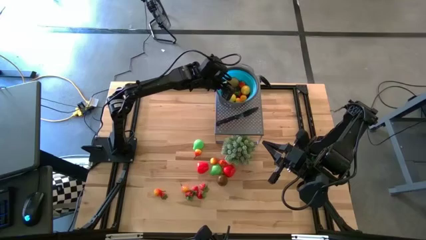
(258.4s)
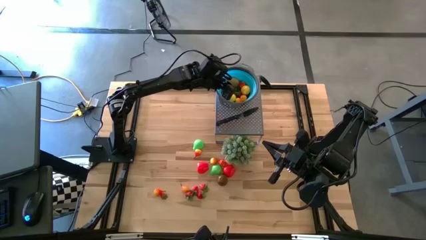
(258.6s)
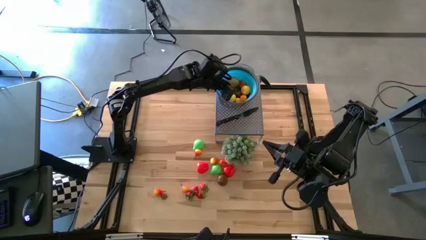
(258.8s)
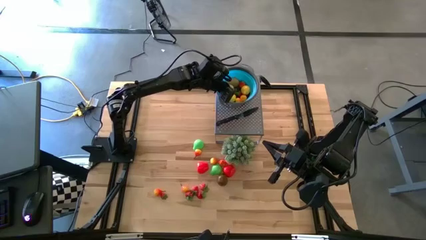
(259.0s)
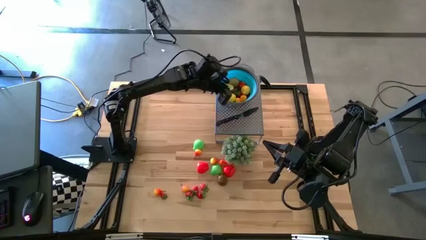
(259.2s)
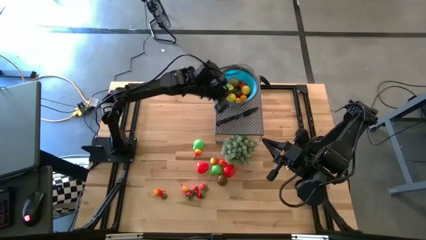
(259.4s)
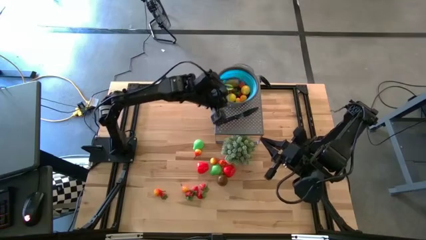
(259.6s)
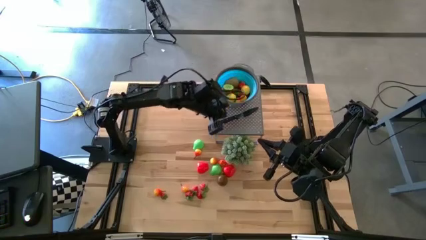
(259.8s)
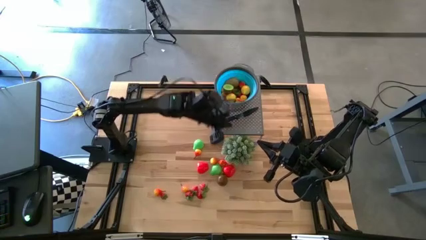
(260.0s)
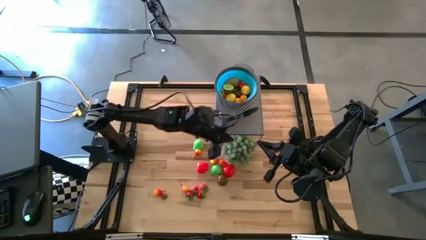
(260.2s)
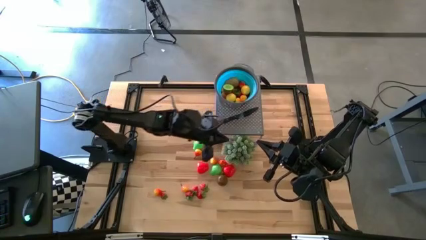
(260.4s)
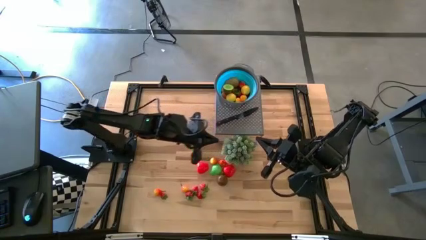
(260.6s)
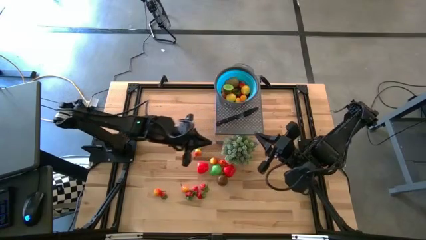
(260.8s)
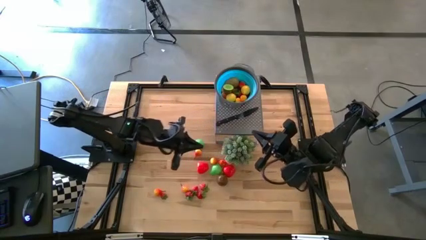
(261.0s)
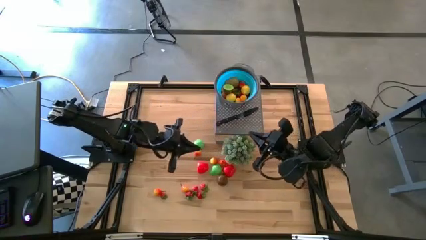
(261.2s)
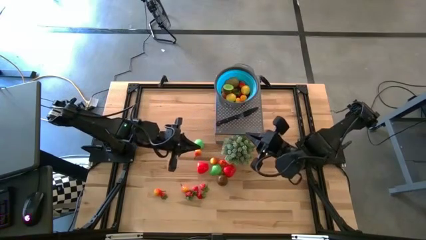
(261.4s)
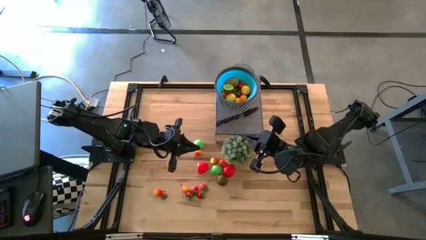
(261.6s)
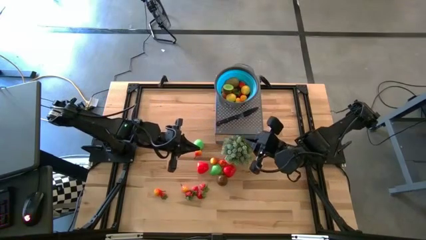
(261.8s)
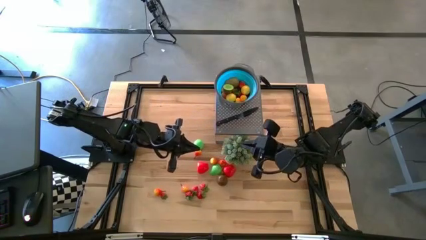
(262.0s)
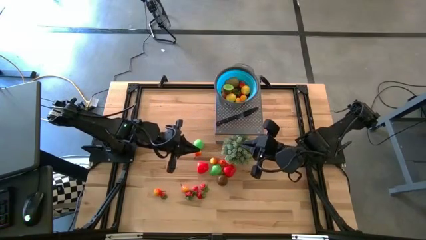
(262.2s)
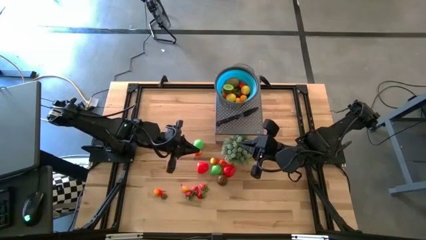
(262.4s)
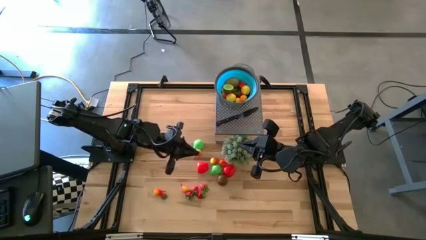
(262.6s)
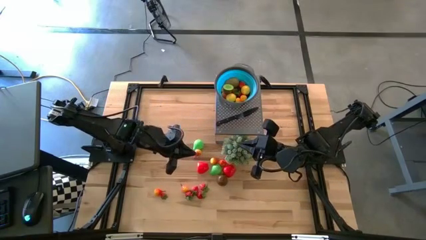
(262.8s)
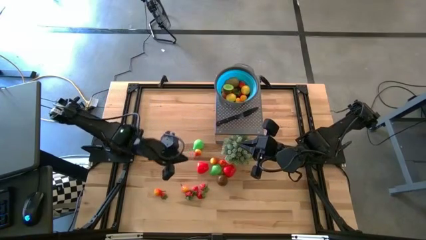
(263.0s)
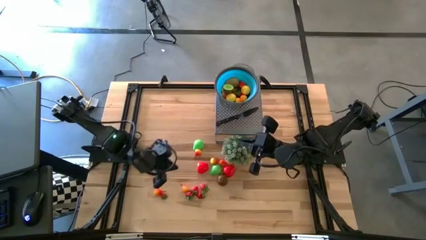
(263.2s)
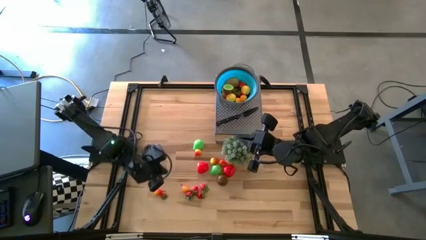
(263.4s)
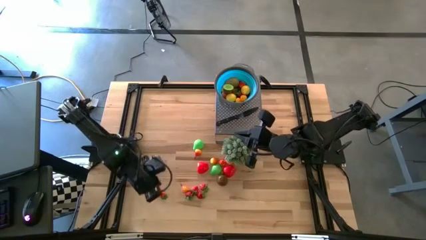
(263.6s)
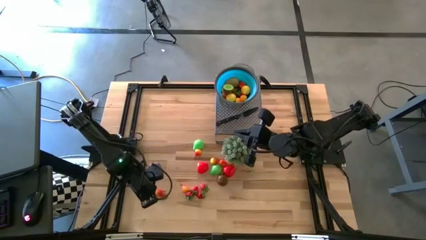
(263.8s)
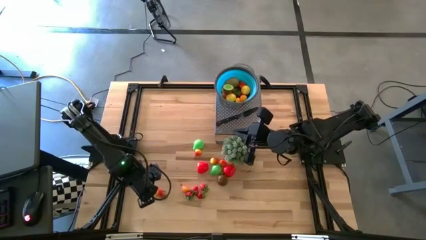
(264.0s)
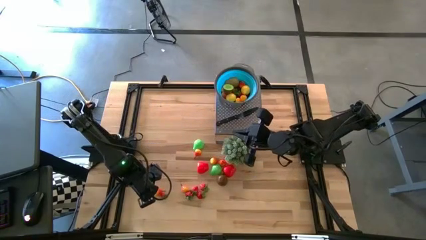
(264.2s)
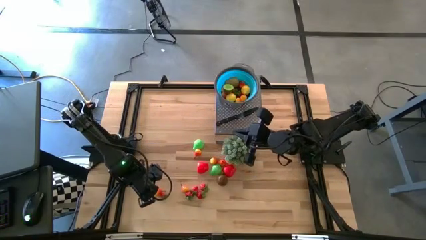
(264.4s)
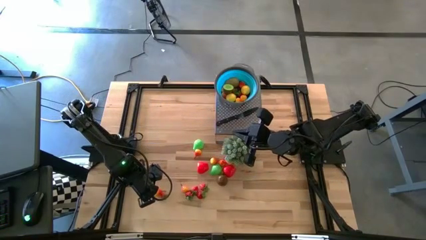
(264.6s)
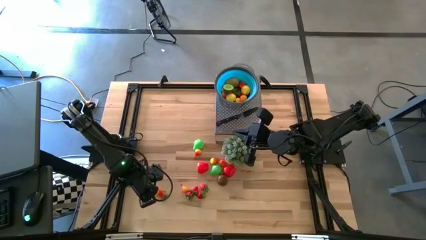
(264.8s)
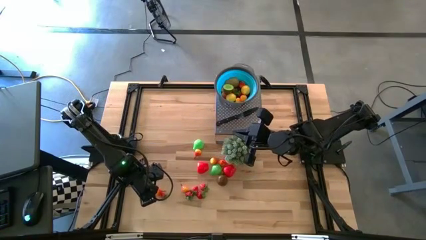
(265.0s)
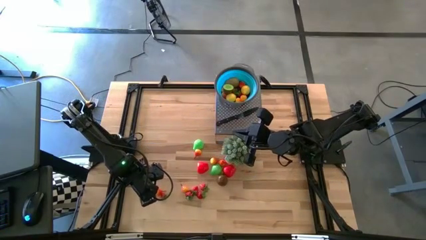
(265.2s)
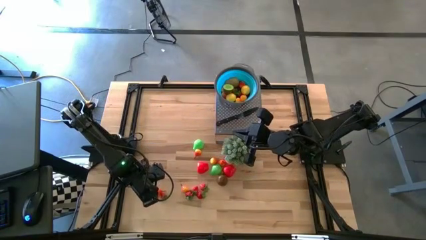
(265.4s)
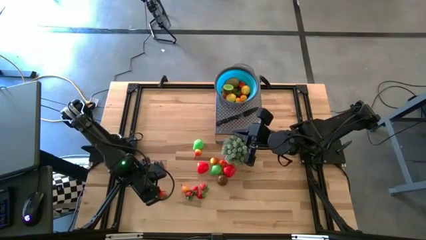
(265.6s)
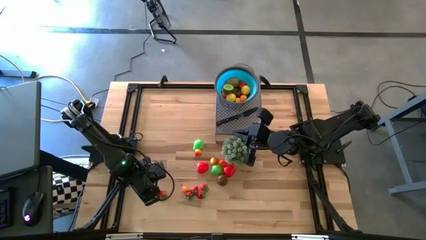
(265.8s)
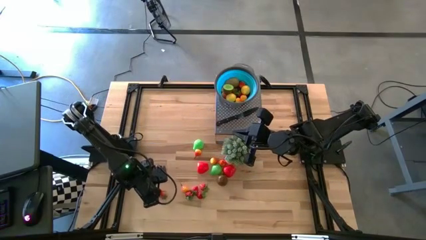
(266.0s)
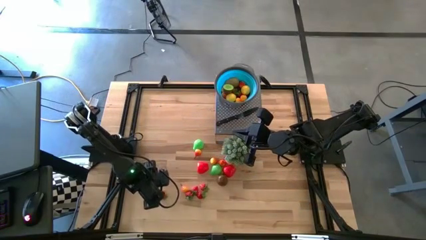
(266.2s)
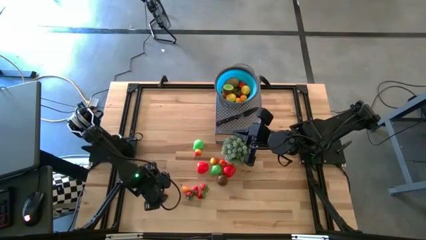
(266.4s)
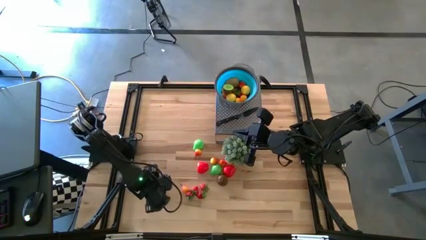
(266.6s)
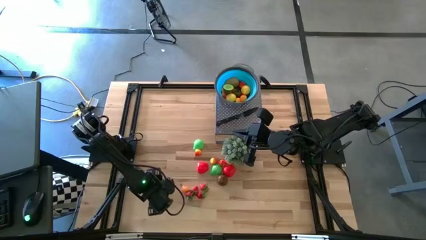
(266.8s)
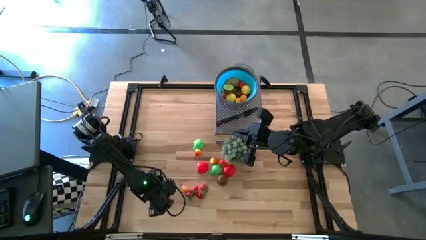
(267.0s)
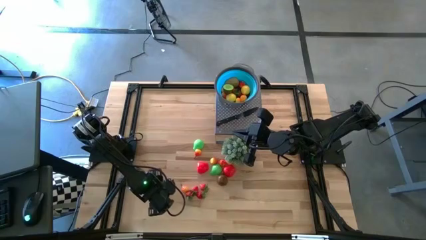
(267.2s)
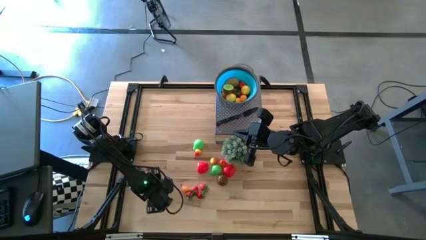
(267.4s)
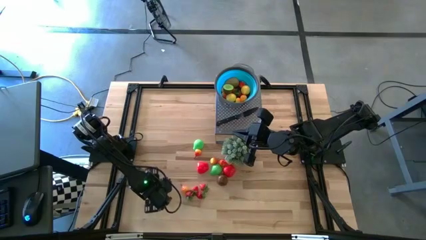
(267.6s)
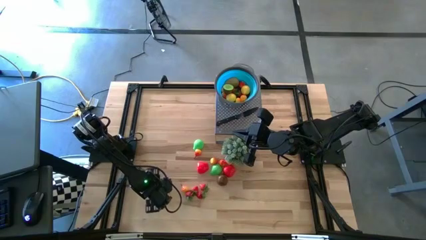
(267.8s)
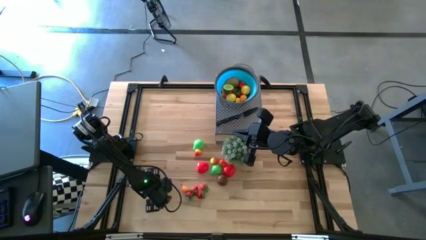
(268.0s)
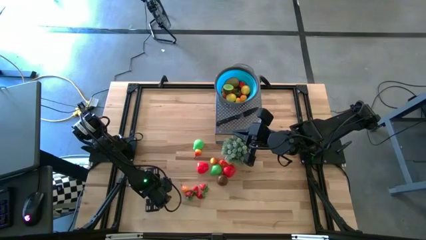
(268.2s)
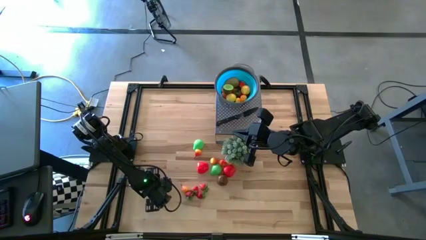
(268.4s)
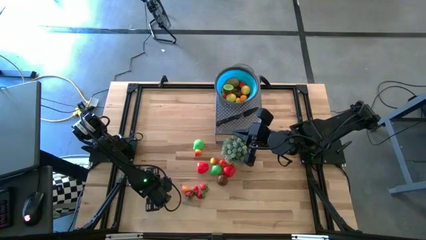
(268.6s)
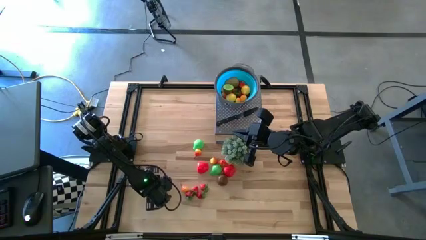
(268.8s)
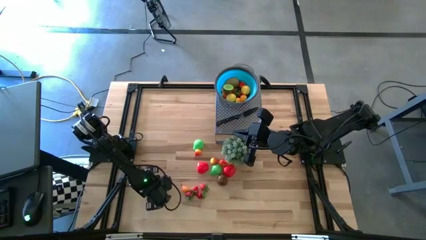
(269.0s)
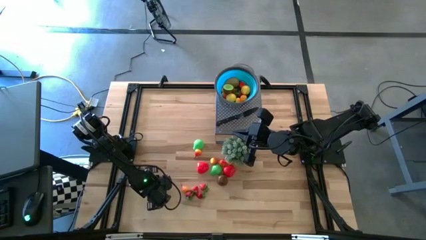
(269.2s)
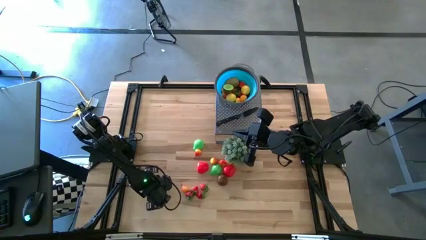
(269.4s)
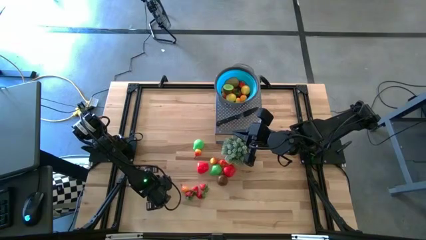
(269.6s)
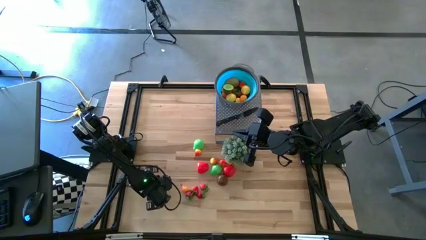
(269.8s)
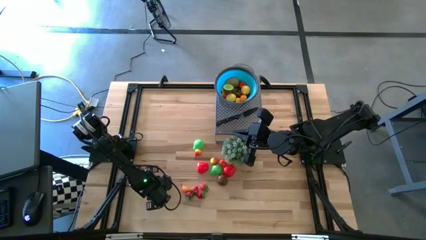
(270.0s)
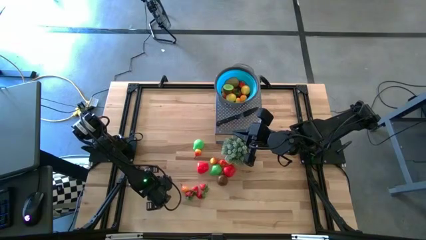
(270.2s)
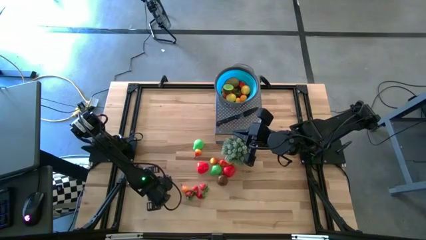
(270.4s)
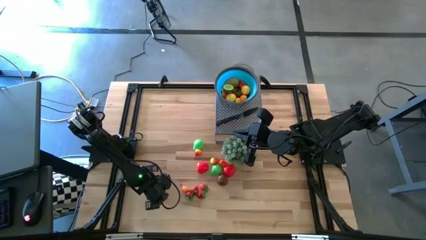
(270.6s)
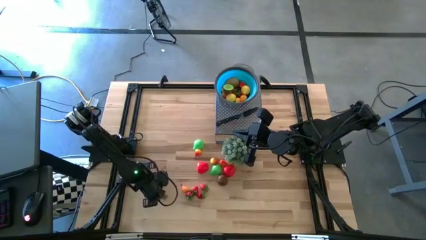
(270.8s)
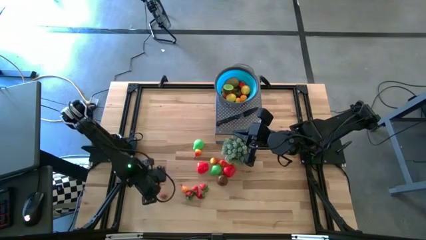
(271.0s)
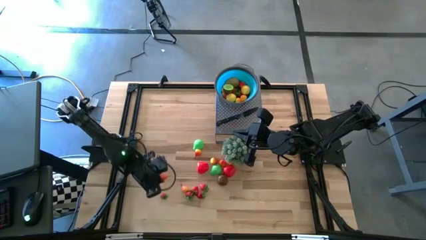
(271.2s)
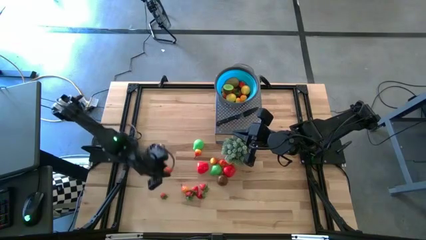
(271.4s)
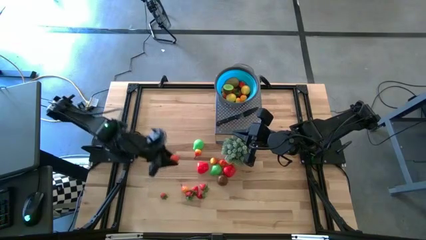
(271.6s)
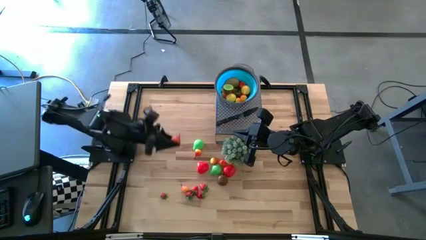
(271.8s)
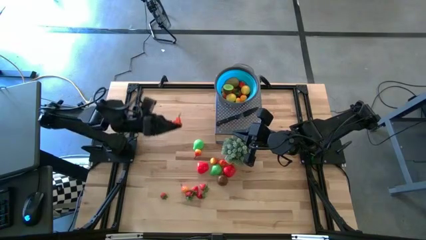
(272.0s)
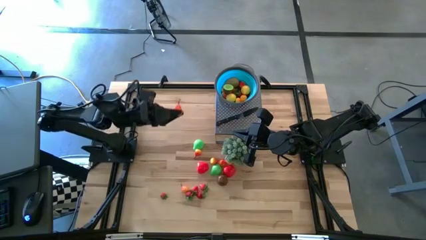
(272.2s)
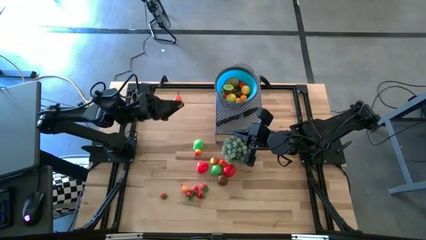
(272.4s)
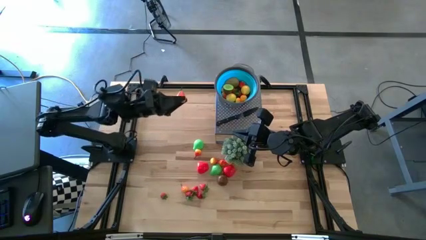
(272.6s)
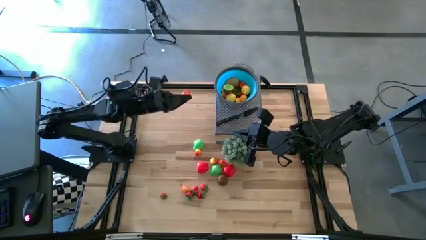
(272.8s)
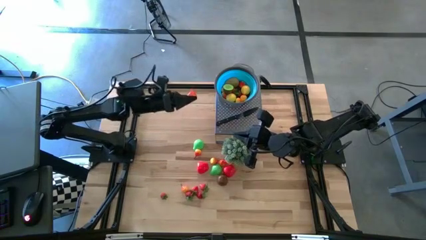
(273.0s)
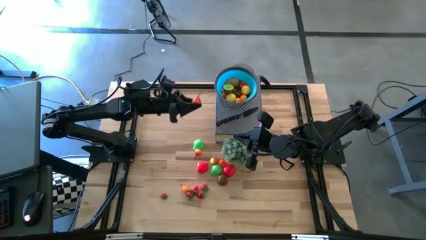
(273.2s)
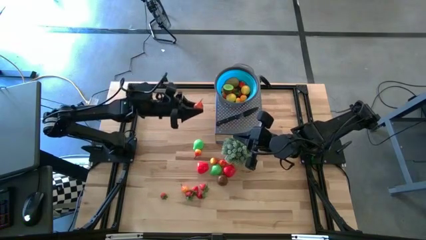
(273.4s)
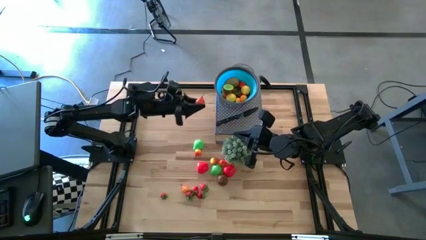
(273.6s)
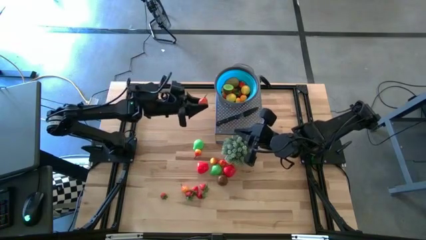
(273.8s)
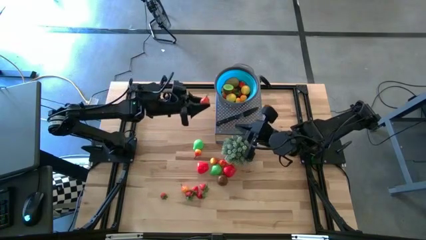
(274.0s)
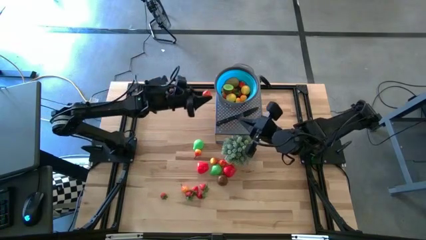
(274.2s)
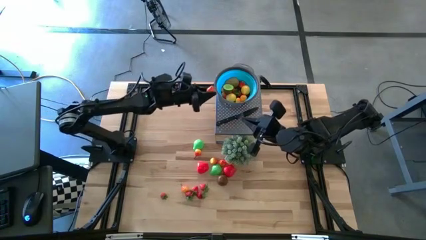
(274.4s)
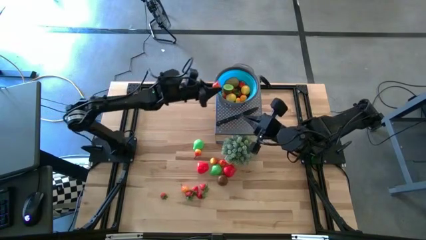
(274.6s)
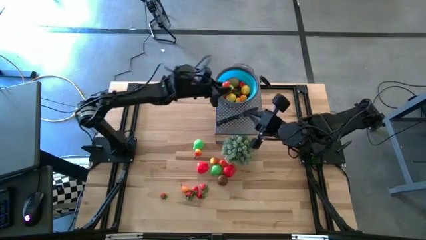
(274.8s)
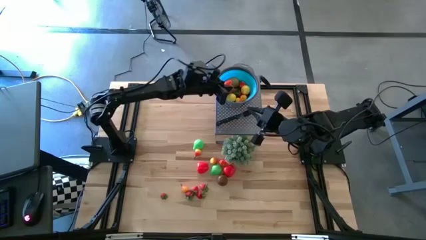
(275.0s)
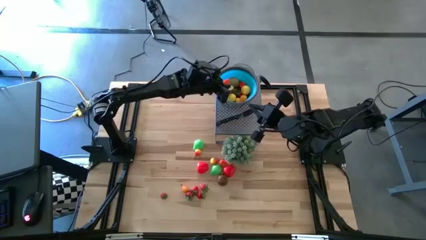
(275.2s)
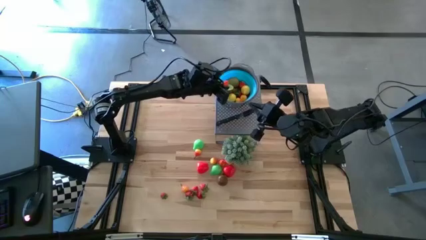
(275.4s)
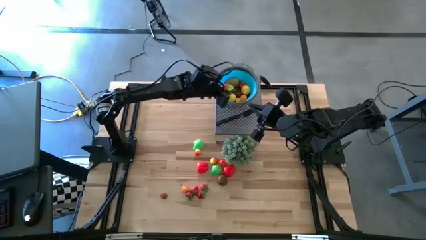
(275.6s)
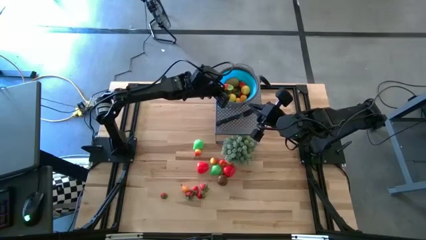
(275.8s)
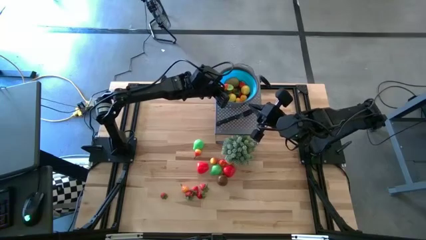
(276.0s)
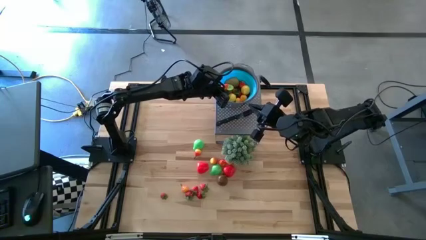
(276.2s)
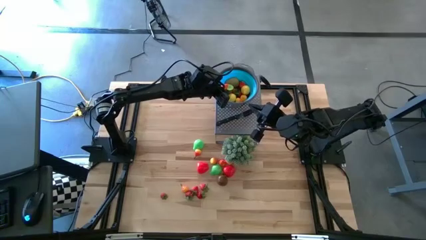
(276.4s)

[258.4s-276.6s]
Task: Pick & Place Fruit
Put the orange pear into the blue strainer bowl
